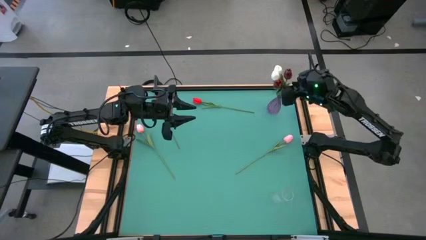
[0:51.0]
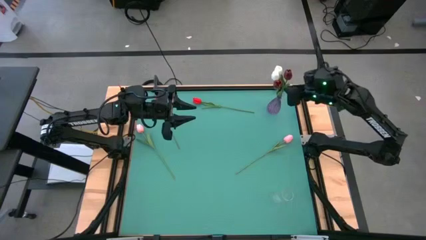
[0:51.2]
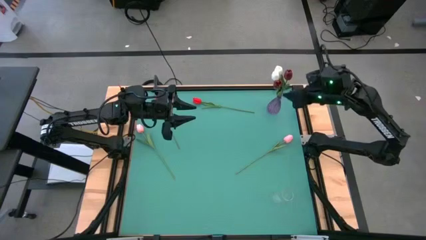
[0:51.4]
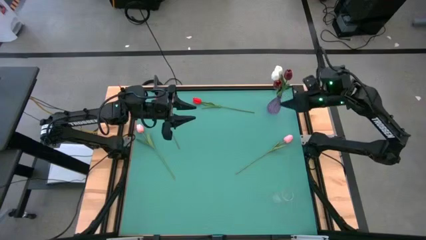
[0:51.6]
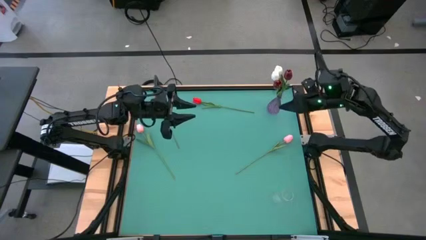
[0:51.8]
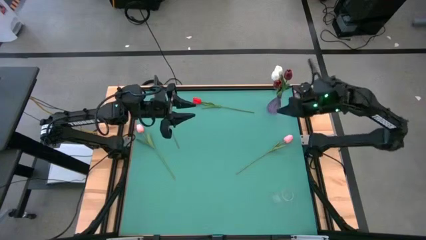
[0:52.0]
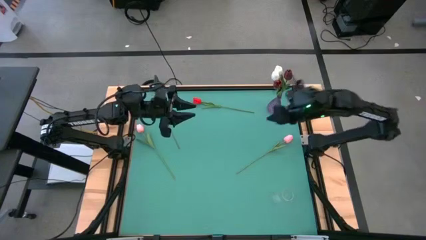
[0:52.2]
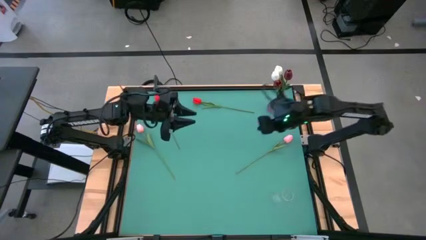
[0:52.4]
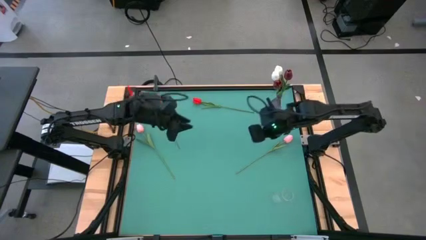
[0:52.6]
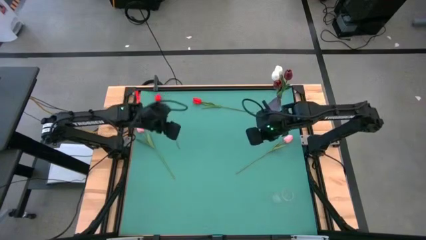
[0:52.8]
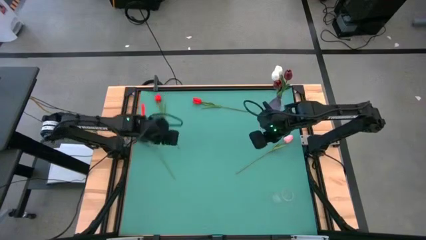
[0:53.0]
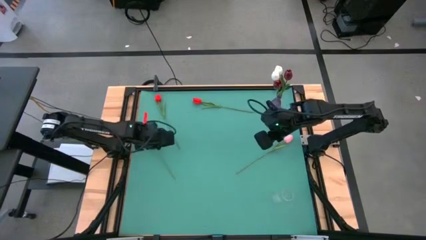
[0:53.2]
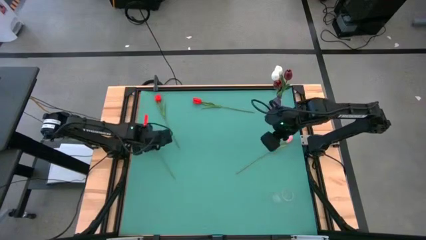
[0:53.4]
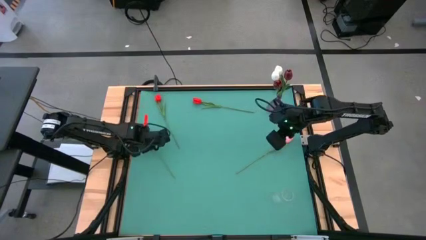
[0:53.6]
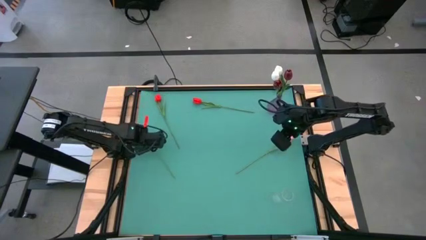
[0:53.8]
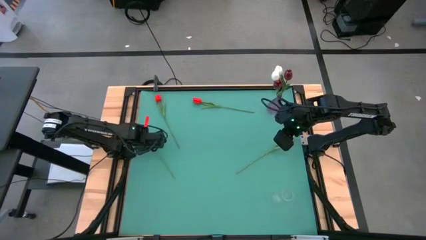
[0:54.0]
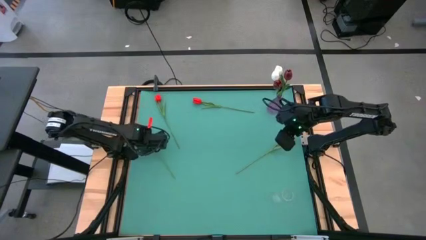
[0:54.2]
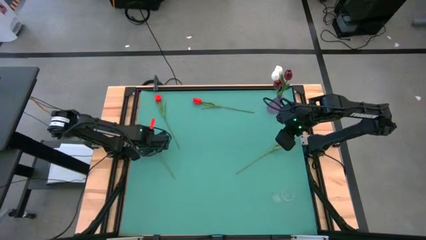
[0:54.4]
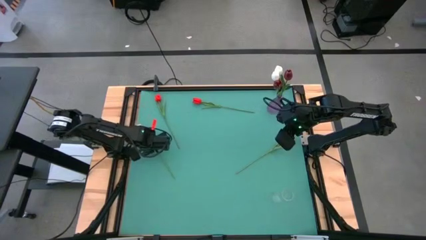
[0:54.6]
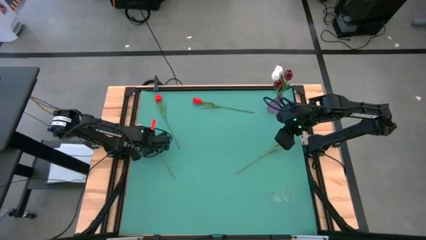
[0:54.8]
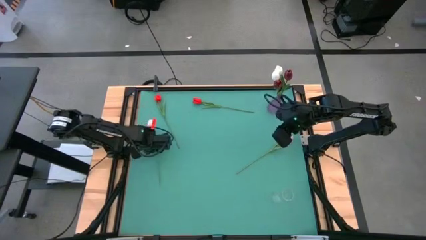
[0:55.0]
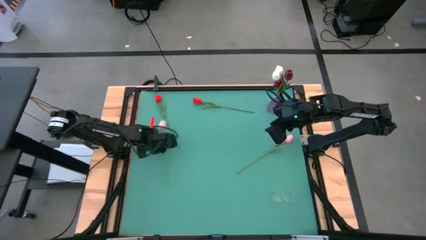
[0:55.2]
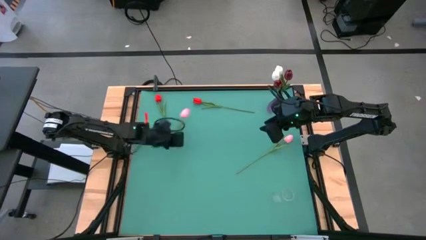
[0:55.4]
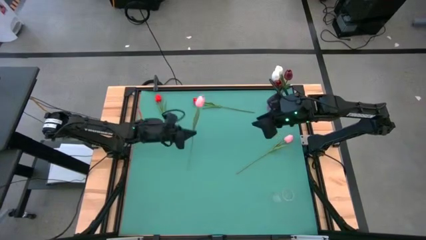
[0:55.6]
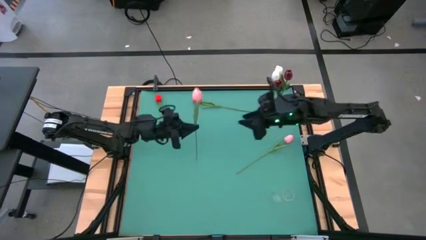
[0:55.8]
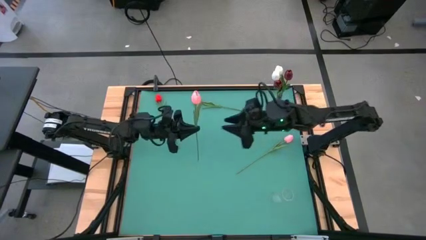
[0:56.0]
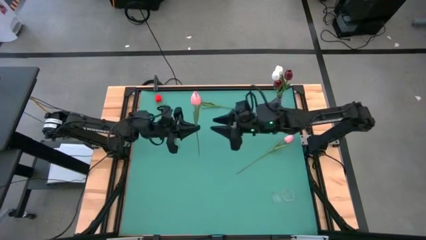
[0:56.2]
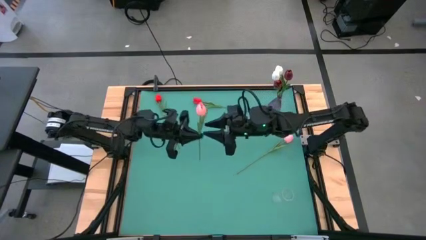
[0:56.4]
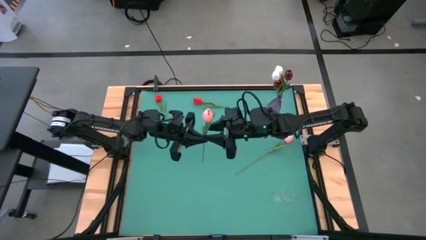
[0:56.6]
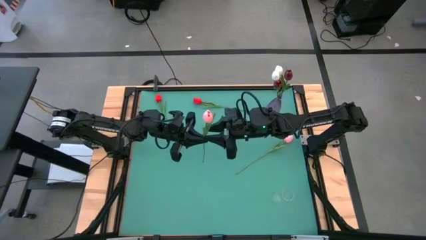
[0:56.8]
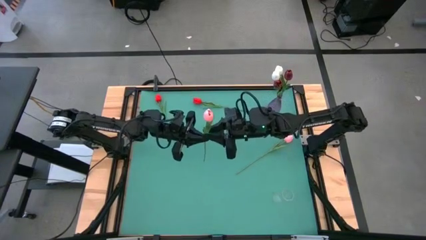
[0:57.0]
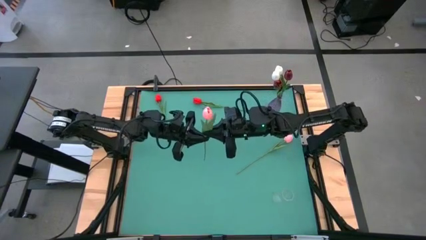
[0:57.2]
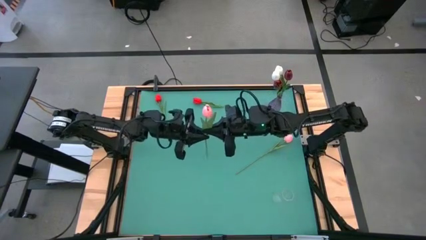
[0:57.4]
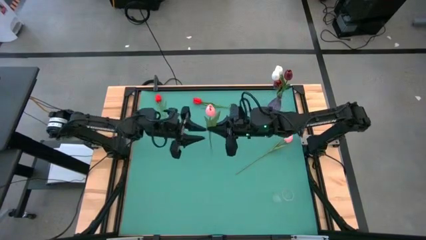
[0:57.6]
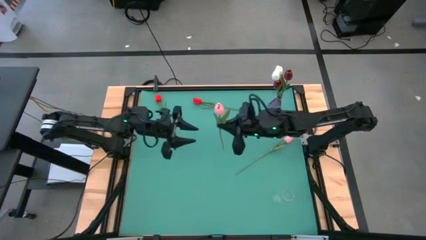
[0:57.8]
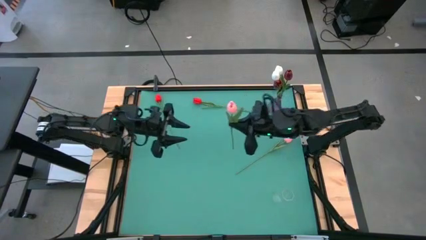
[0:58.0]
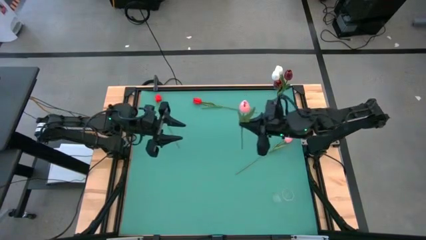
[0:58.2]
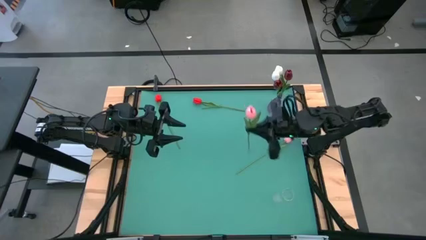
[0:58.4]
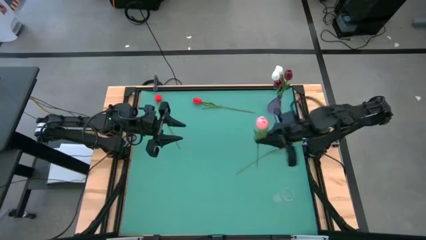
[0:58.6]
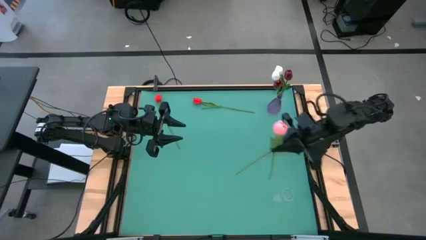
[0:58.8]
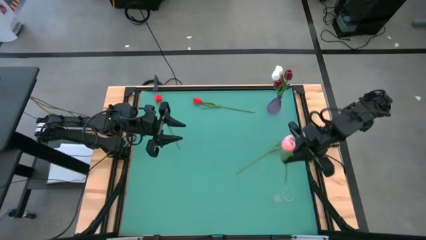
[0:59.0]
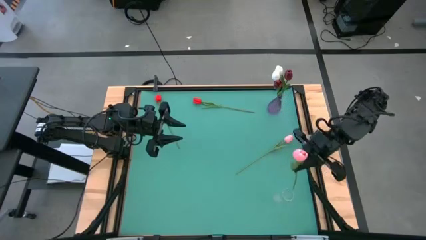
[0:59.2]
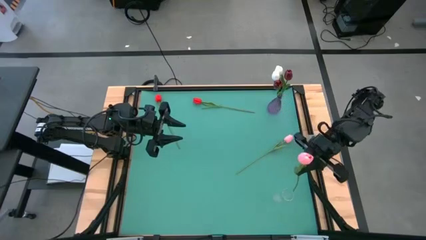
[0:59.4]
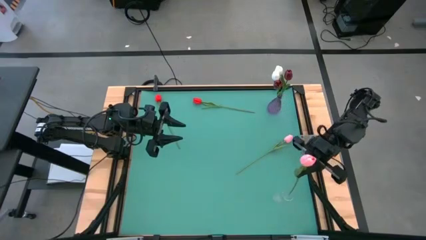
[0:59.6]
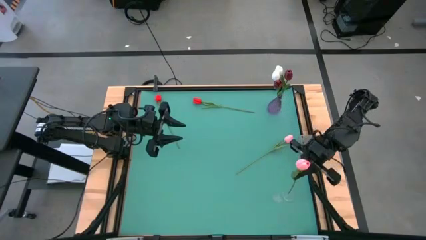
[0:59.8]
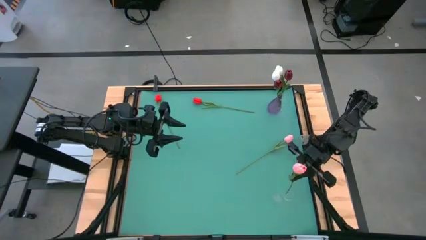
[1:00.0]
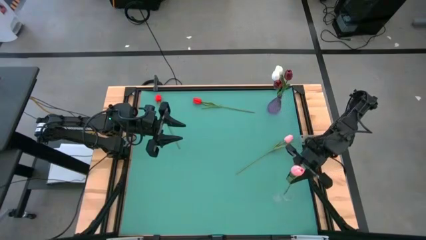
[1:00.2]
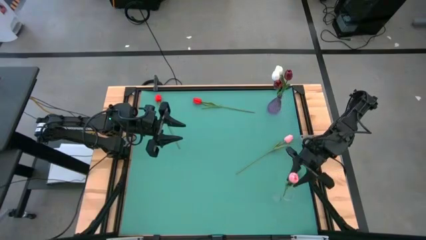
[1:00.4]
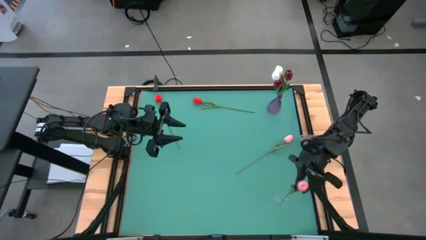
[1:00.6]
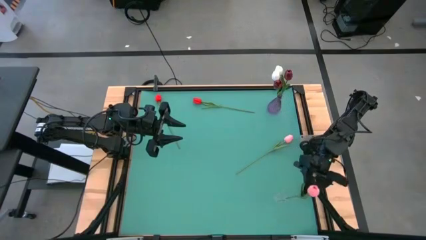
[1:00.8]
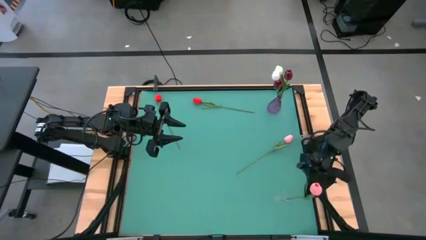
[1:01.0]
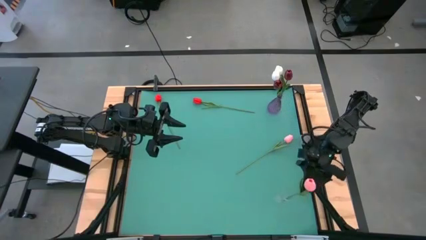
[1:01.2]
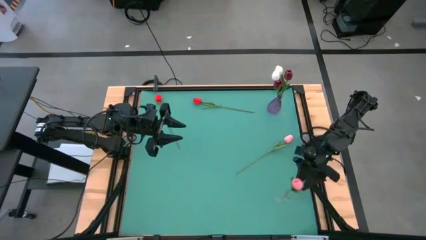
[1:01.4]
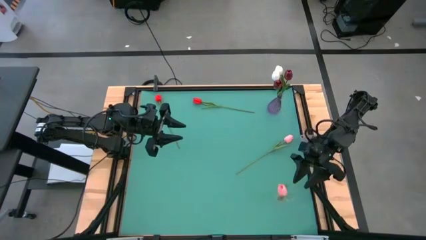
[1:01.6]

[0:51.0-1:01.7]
Task: Sort flowers into vase by color
Put the left pink flower into the transparent vase

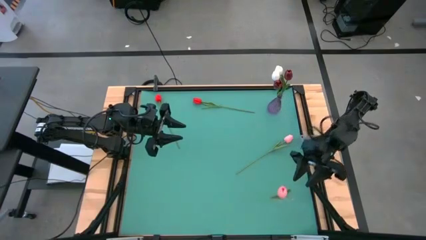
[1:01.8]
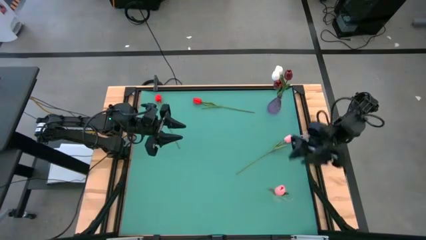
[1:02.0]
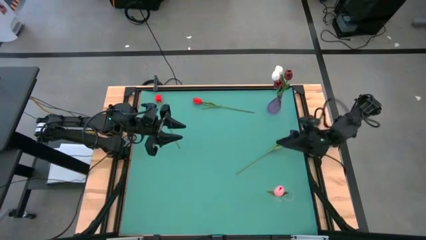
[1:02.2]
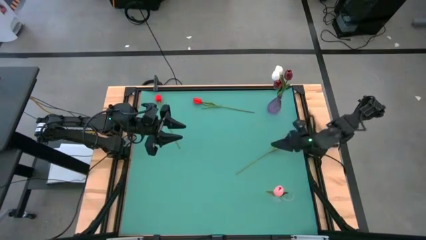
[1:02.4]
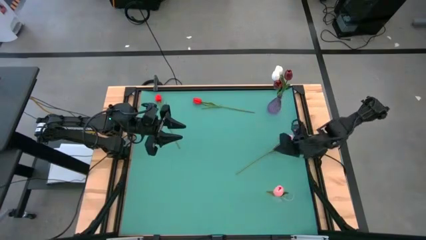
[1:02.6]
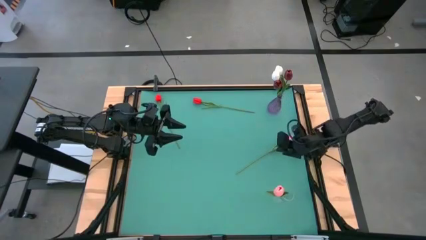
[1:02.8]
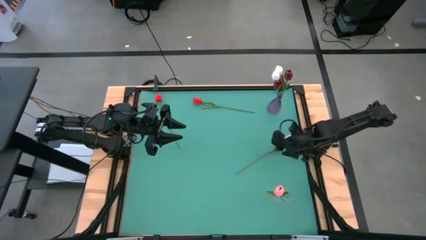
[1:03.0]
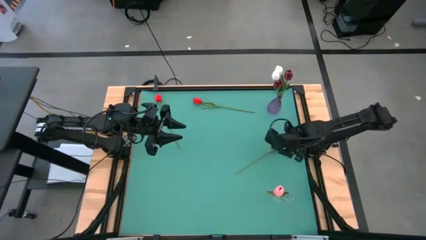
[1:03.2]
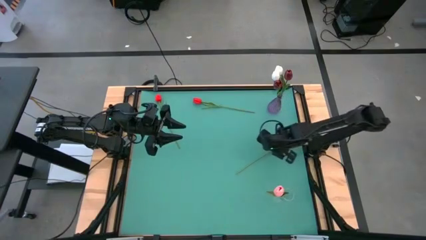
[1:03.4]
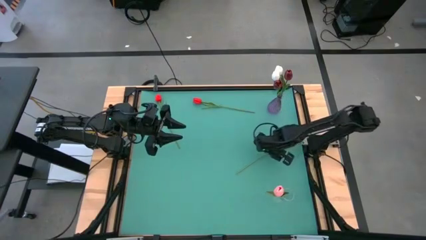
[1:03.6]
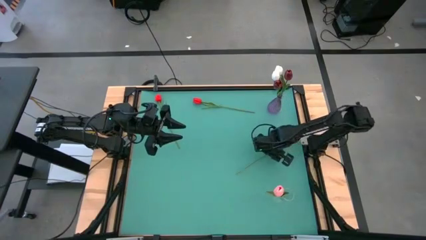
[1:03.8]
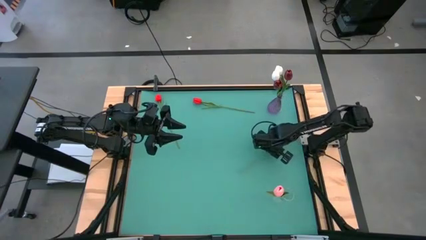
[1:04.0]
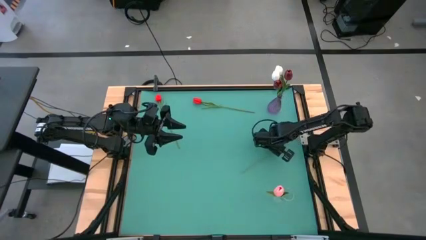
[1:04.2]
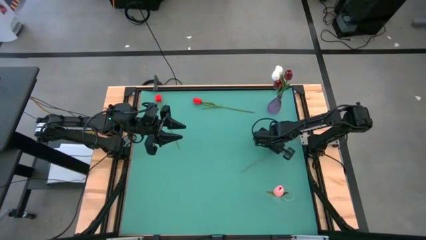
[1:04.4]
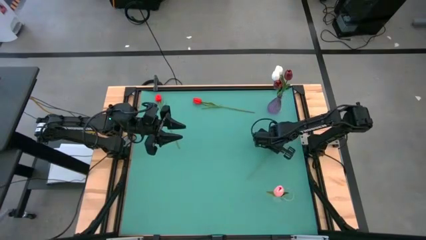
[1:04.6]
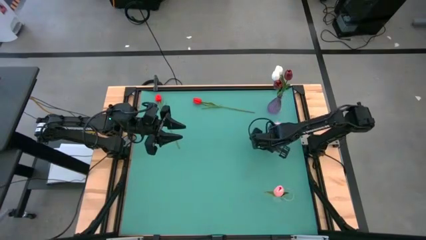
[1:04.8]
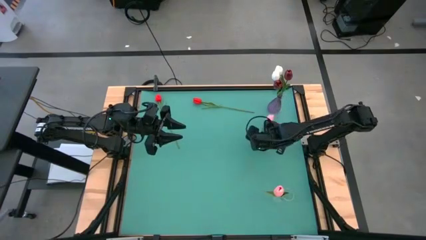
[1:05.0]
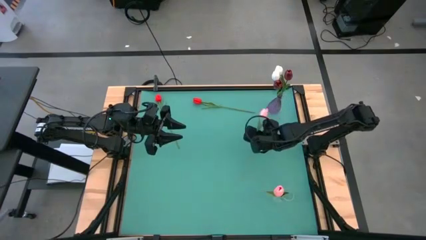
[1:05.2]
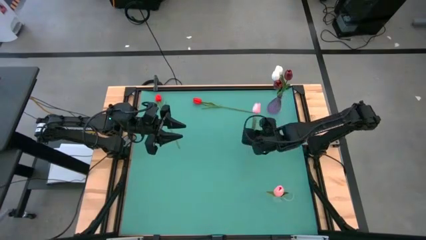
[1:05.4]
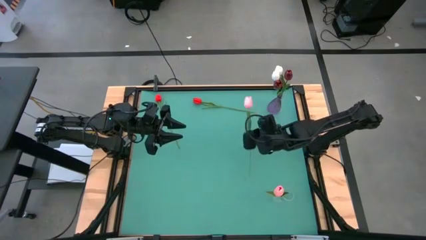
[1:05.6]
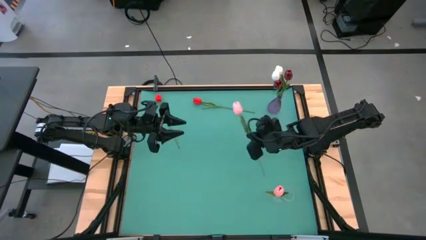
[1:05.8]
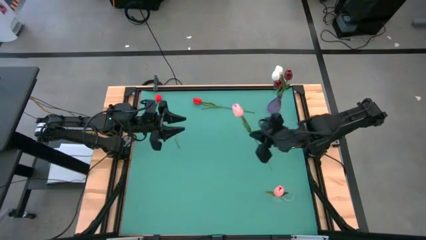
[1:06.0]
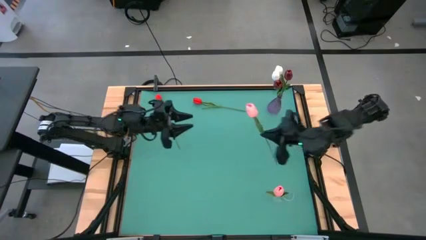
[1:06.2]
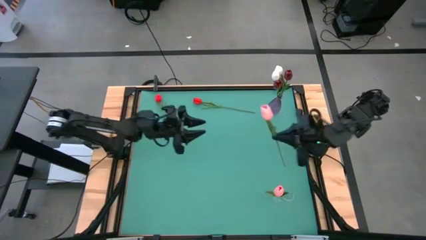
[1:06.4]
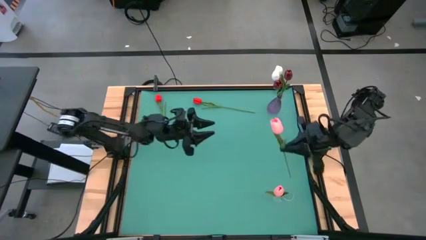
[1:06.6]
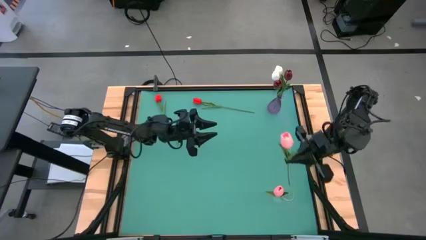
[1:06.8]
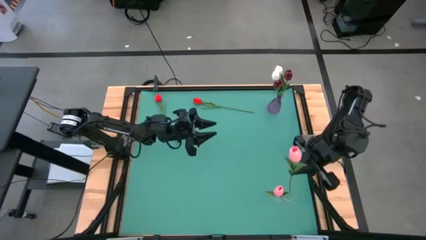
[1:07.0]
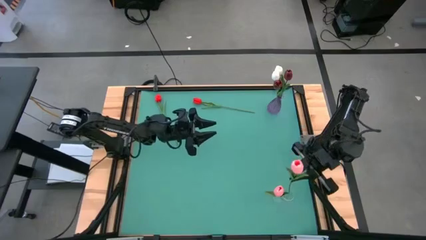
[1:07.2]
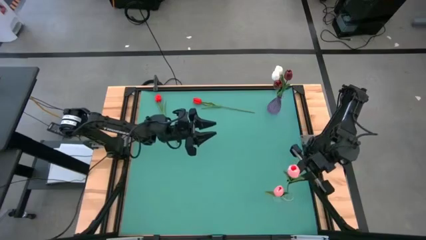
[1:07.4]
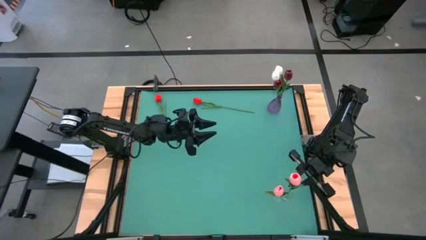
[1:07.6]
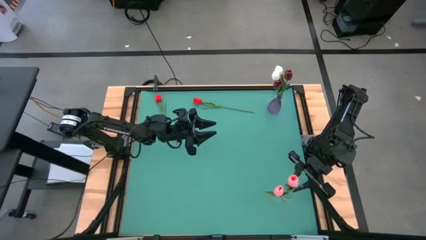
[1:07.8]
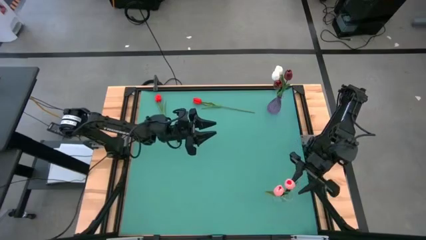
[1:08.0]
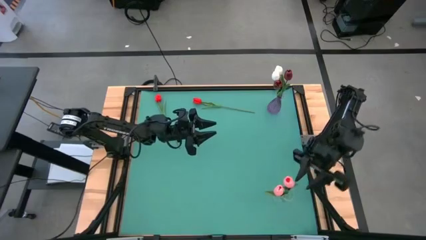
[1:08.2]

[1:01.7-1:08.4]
Put the pink flower into the transparent vase
